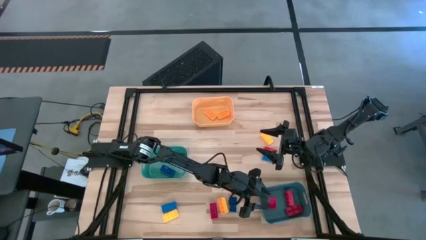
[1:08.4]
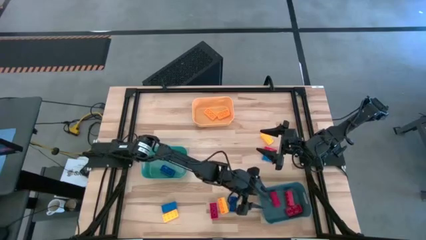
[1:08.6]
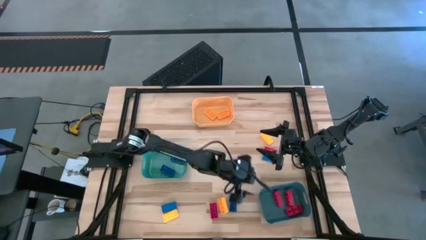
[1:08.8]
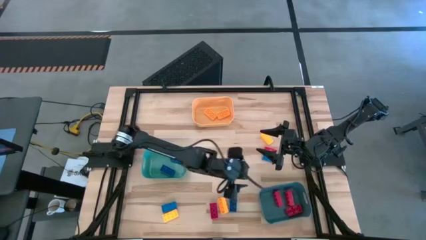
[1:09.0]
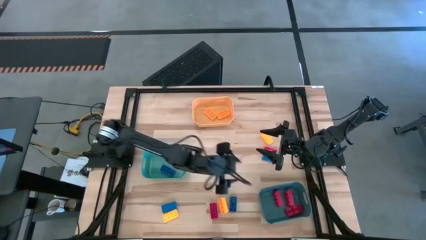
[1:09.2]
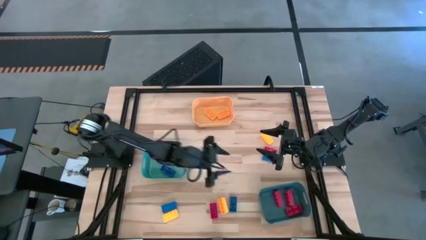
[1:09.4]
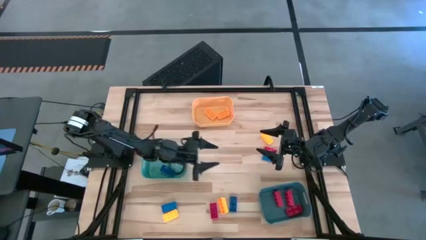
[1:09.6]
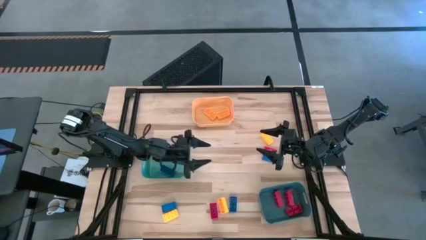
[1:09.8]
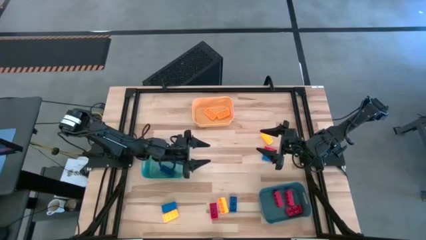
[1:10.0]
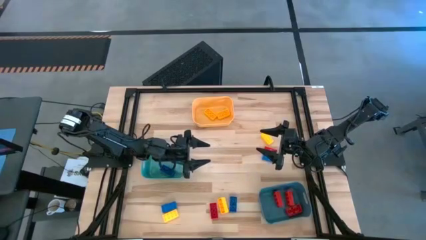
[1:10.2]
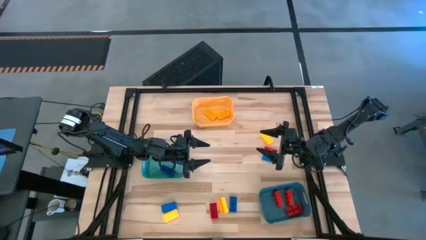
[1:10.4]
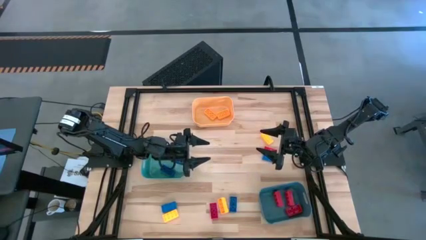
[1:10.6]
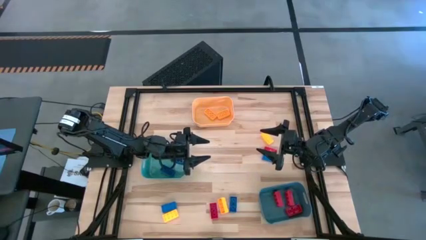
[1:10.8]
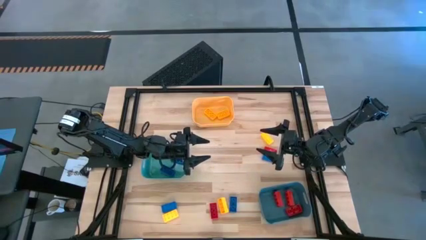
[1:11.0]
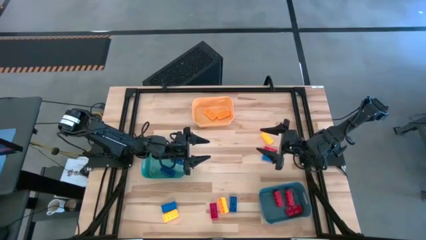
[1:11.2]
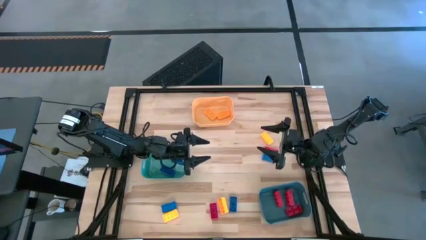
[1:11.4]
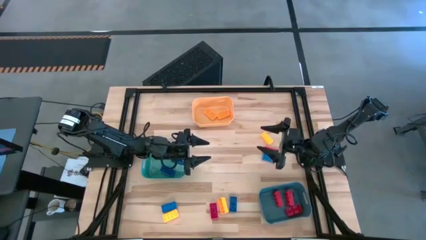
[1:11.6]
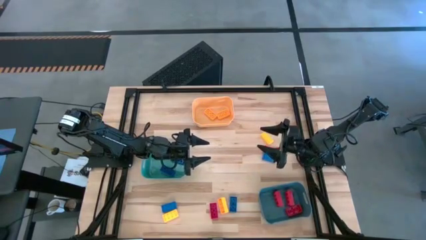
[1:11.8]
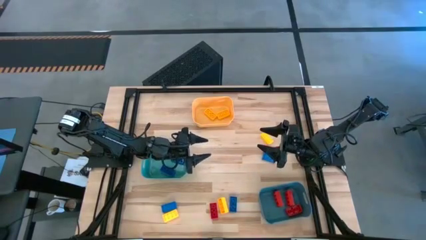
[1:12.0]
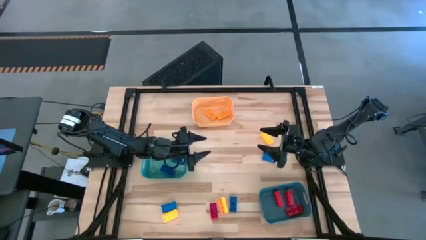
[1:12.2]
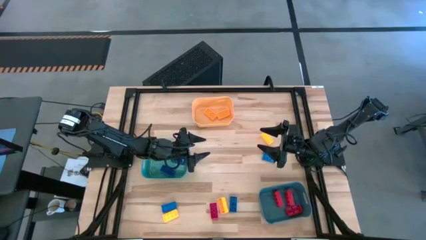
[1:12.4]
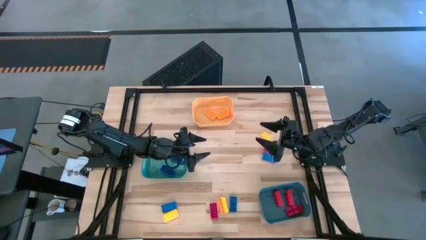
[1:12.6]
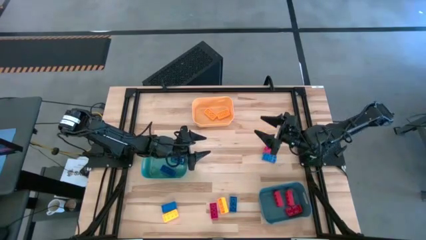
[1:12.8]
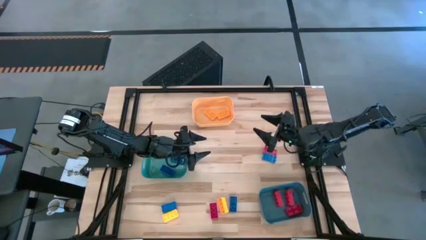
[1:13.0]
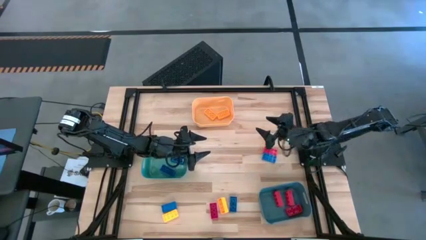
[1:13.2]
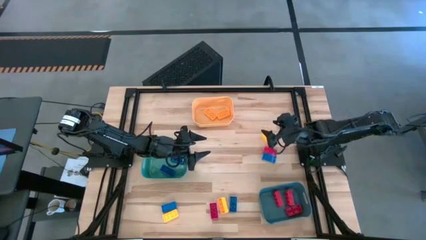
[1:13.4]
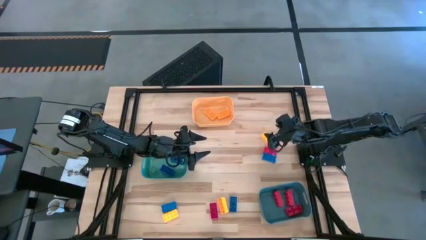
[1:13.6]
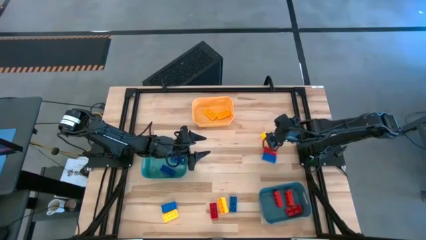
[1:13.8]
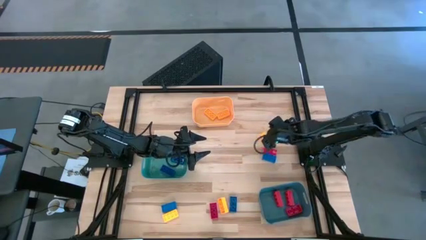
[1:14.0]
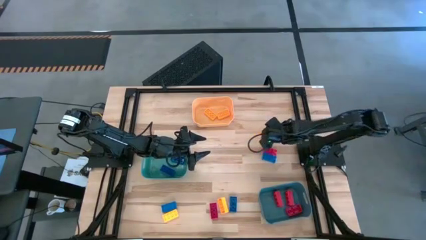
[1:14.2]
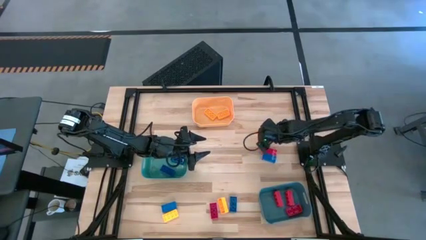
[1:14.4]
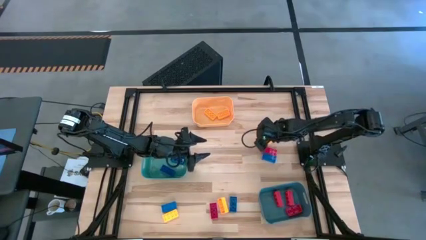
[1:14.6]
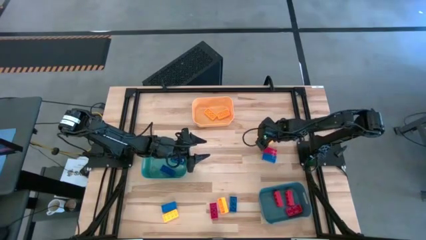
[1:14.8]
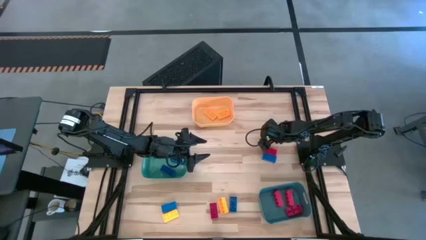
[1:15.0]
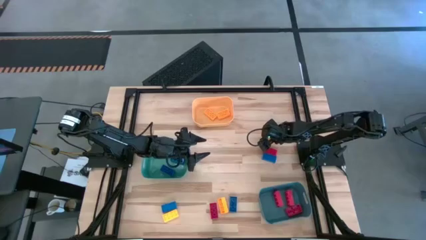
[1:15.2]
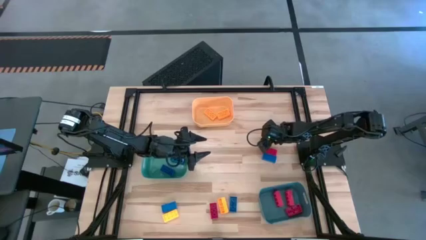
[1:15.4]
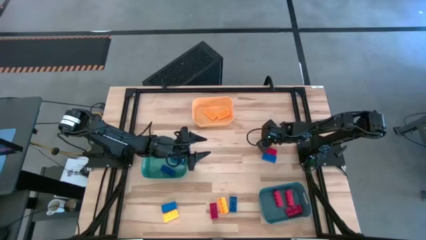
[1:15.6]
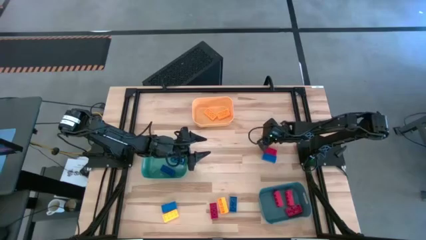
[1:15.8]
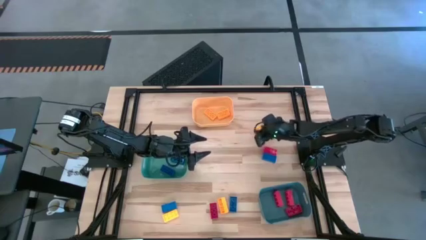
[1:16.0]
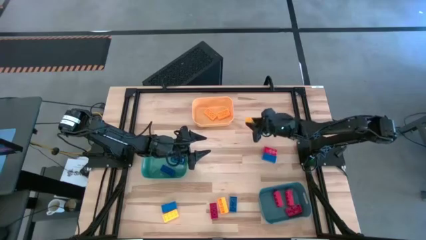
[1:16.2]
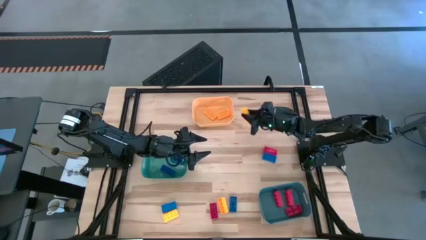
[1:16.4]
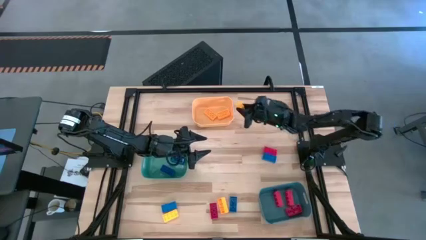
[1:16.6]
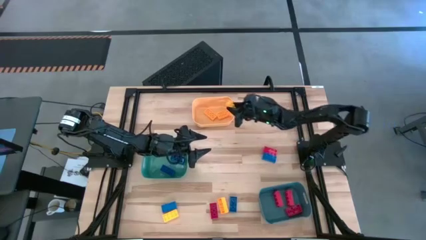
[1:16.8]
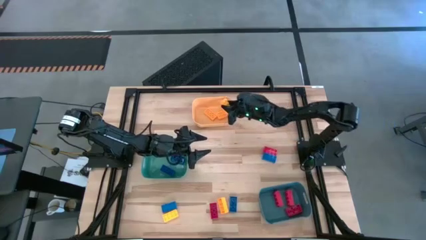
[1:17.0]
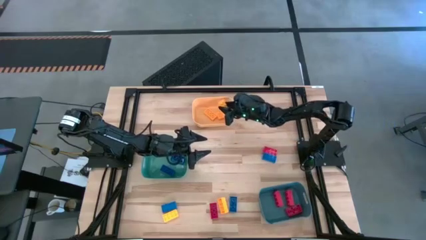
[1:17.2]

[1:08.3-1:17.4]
Task: Sort & place blocks by color
Put the yellow game piece into the orange bin

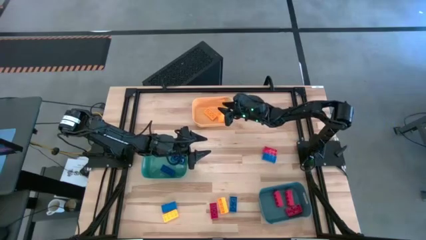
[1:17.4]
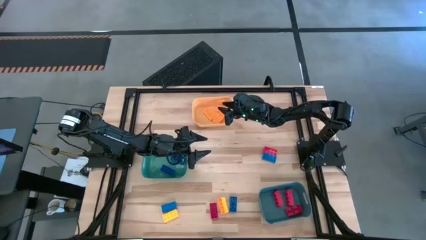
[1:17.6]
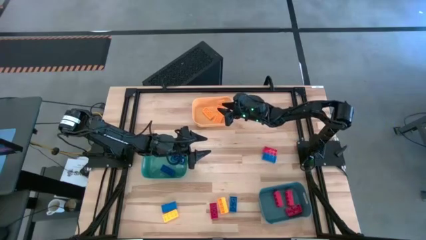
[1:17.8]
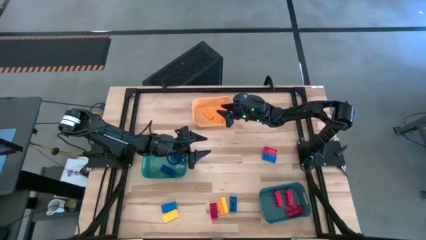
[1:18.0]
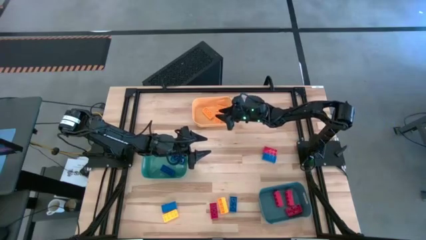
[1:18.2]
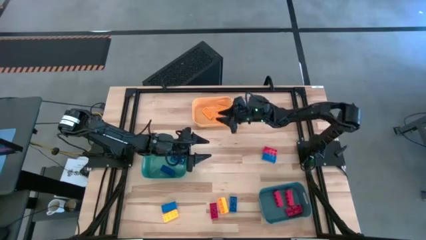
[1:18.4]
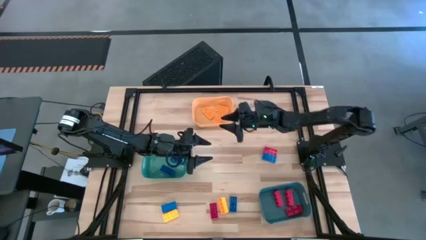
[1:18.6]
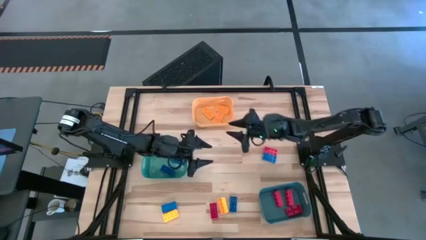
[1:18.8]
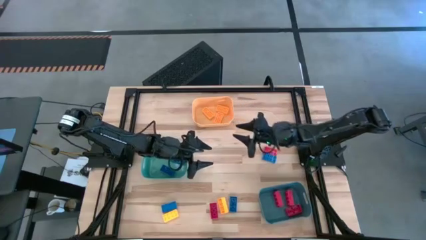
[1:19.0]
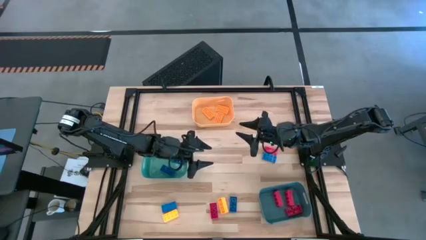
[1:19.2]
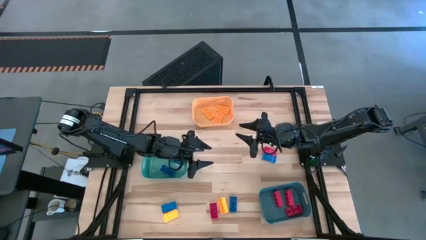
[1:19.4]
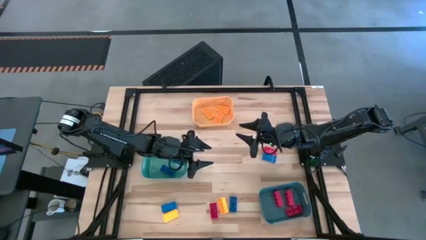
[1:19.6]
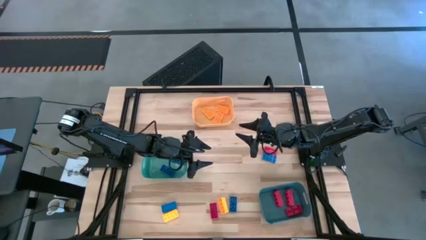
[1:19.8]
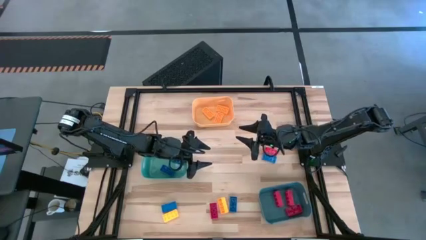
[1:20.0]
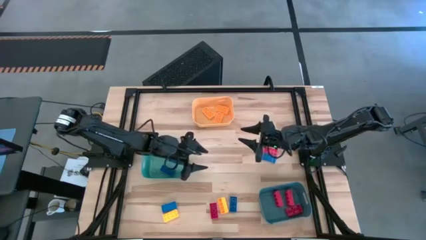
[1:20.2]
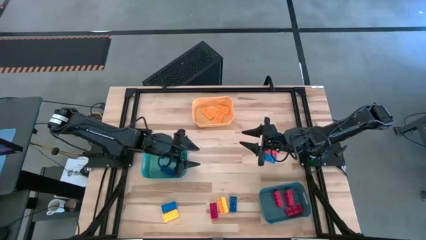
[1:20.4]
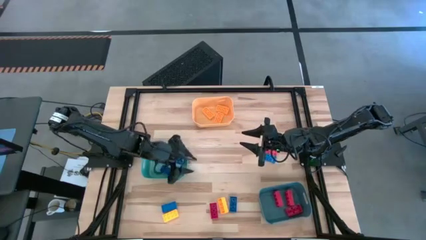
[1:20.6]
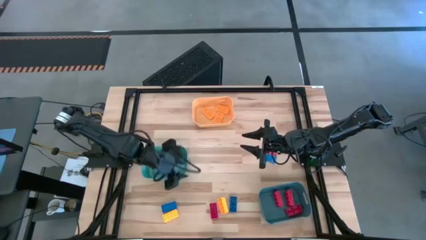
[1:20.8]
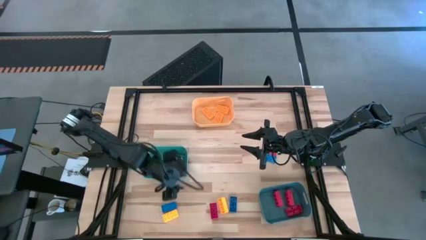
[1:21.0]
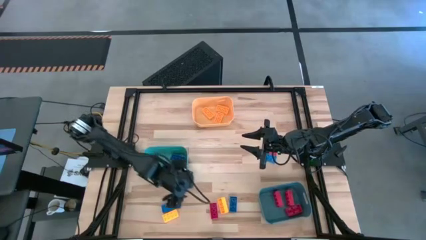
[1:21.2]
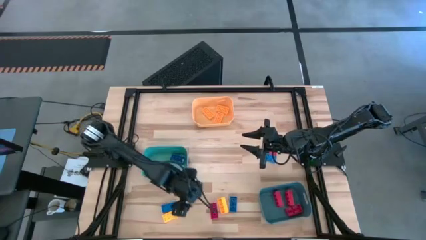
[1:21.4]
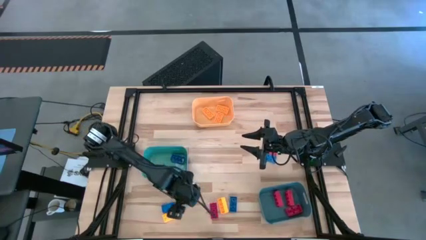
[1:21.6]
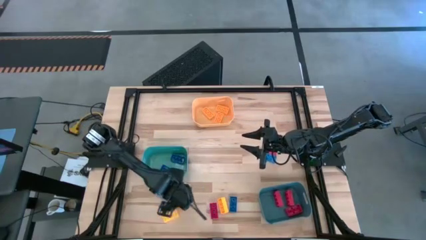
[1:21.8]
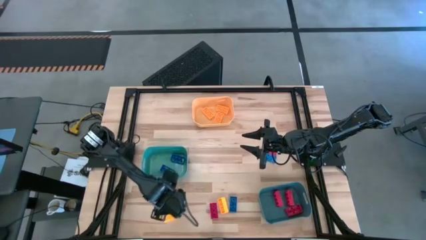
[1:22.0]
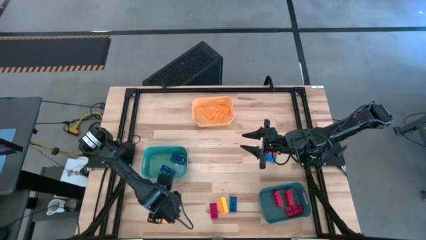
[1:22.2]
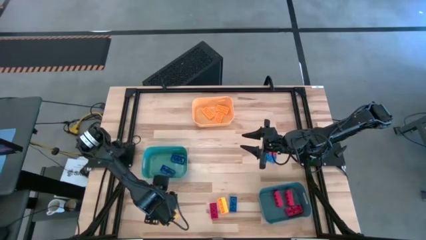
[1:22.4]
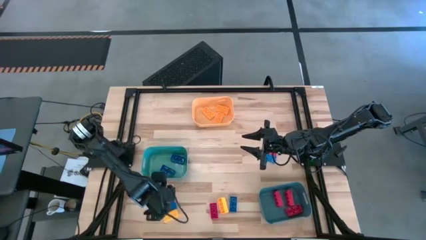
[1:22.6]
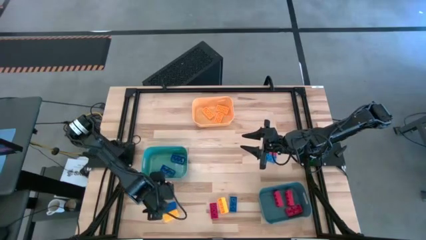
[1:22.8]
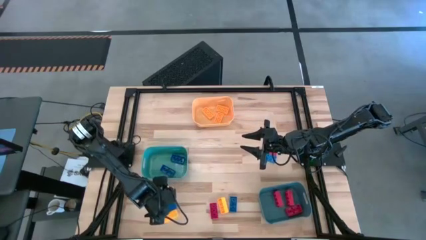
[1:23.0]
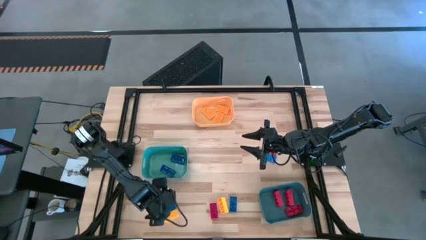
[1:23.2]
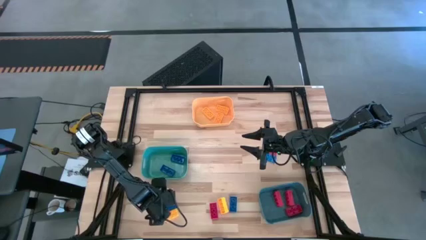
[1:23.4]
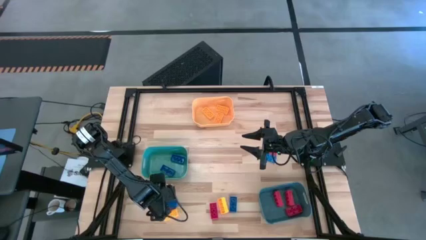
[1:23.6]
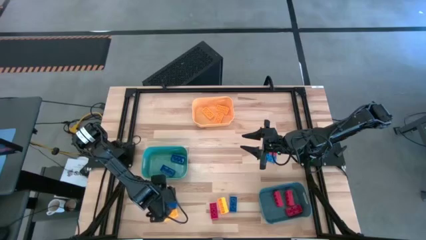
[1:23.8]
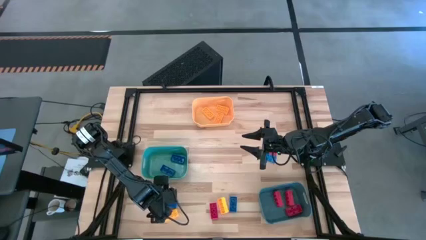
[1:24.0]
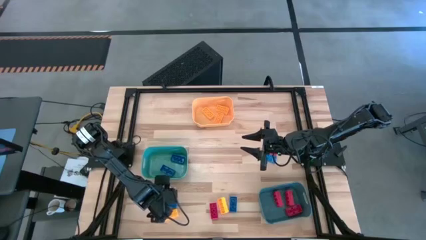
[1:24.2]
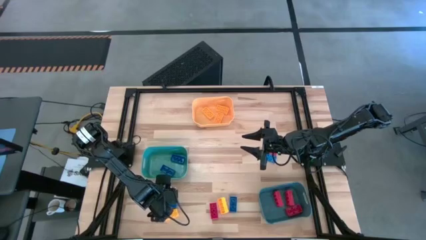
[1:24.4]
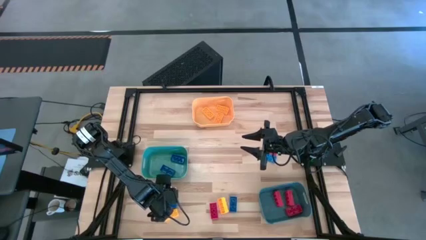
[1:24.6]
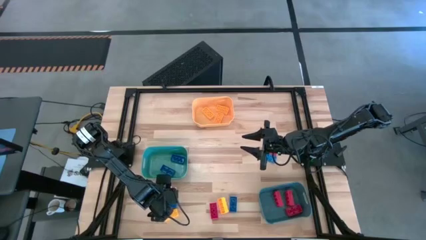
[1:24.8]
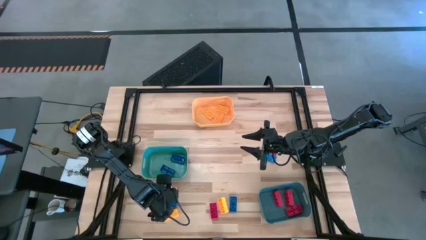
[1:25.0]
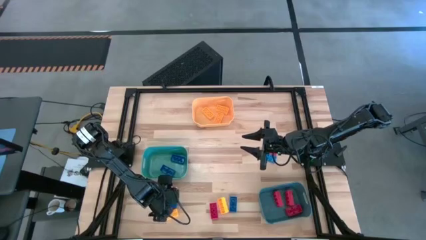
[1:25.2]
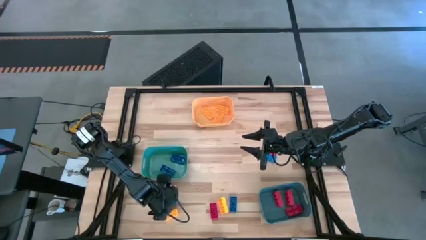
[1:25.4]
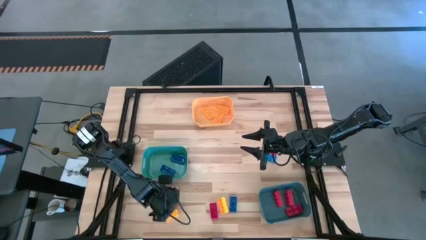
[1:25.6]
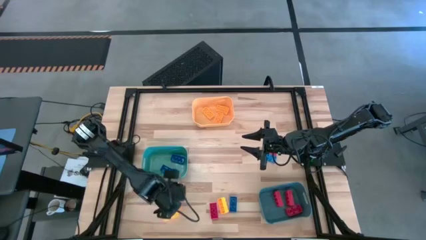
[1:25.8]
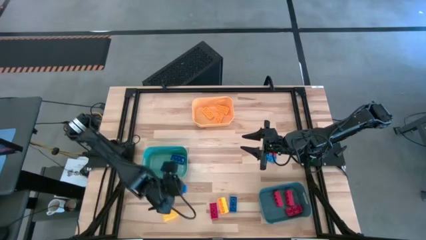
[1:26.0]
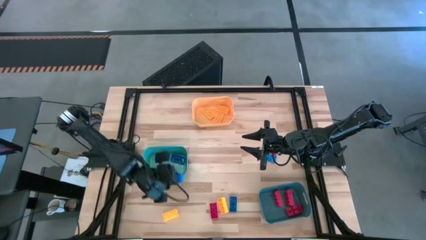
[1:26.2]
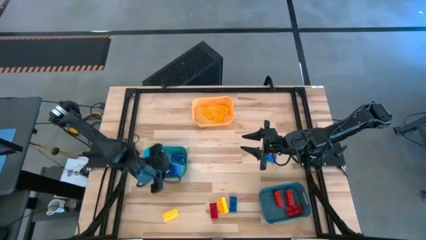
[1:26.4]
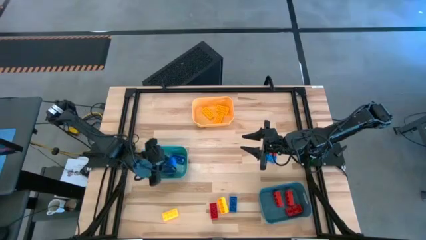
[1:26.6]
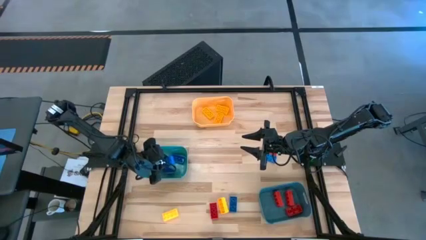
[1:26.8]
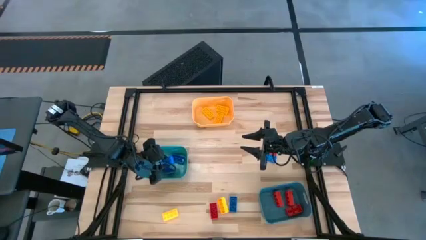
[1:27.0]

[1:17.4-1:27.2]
Put the blue game piece into the green bin
